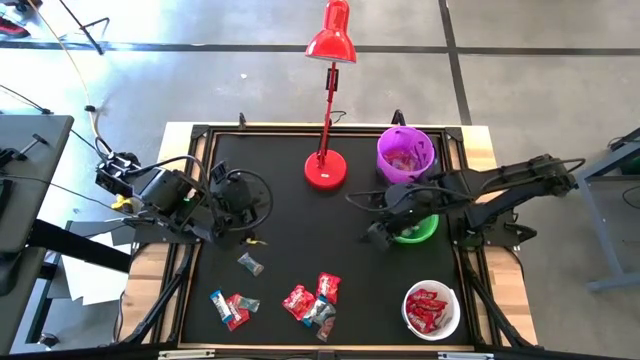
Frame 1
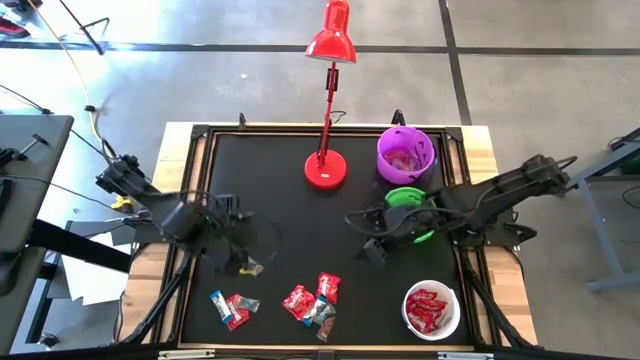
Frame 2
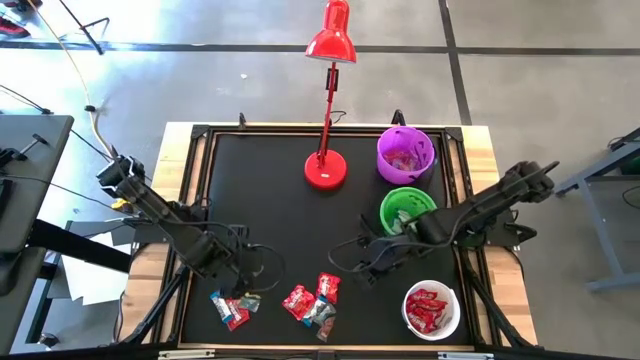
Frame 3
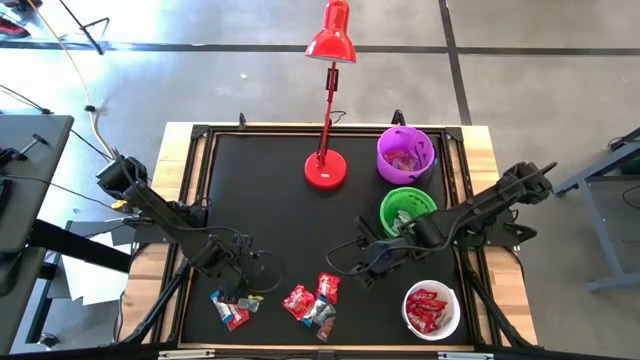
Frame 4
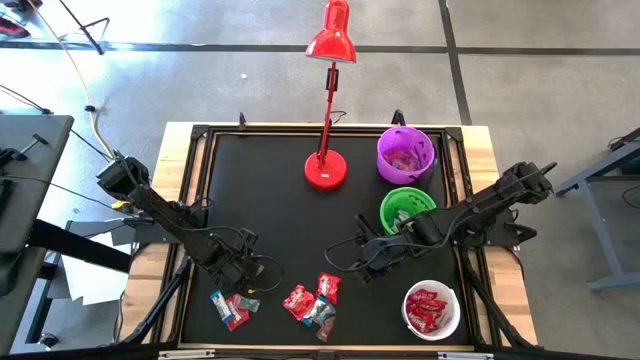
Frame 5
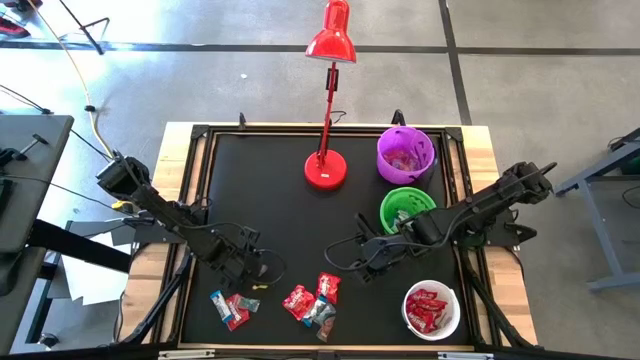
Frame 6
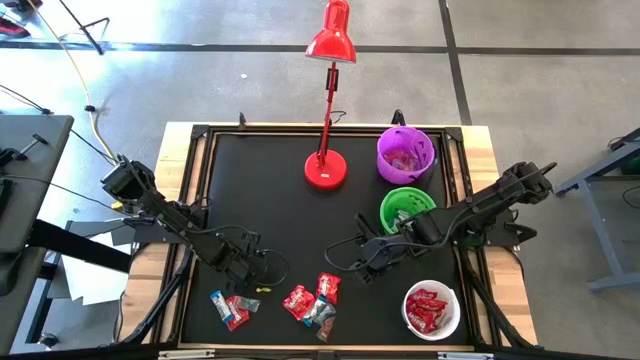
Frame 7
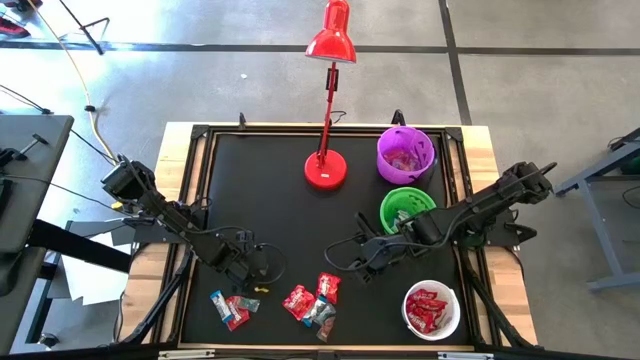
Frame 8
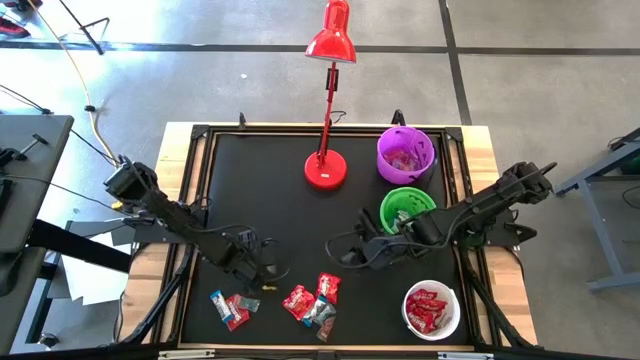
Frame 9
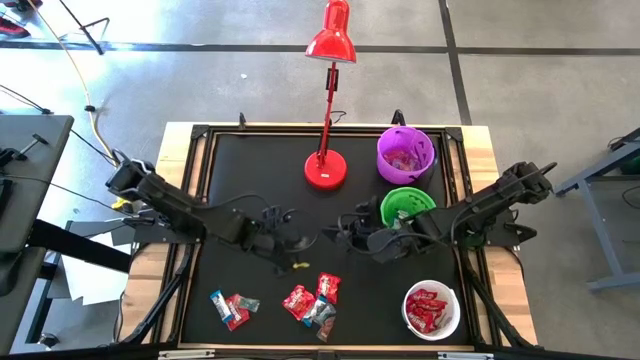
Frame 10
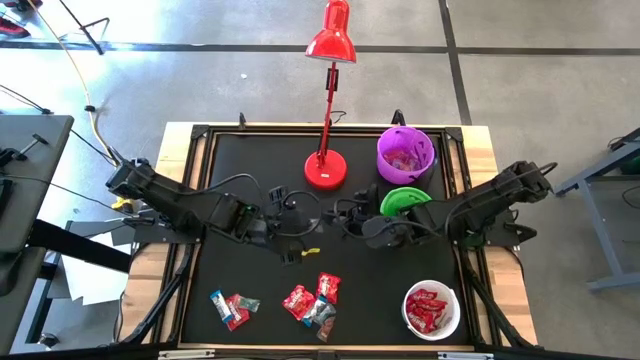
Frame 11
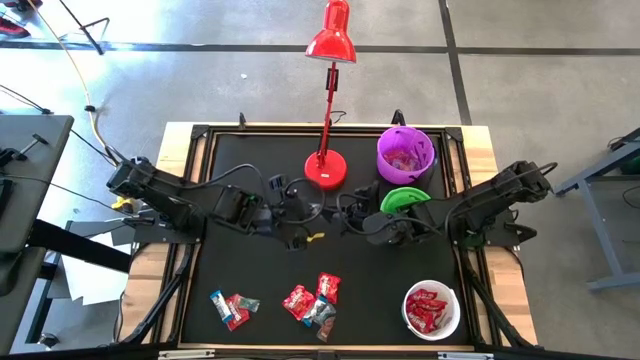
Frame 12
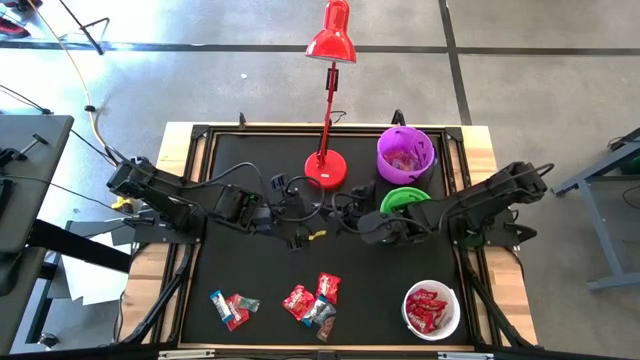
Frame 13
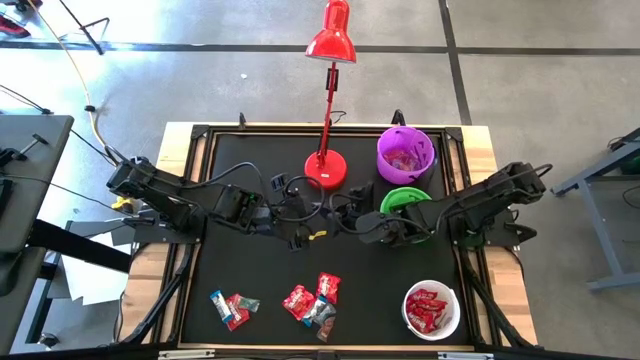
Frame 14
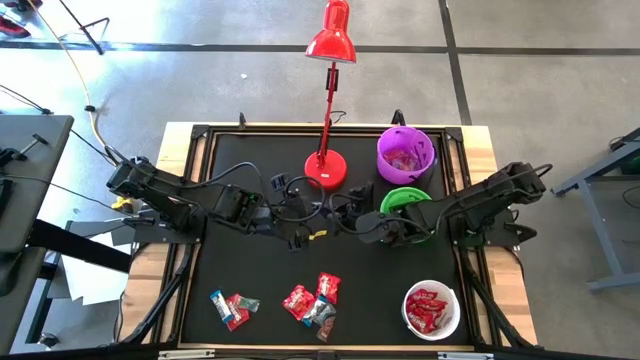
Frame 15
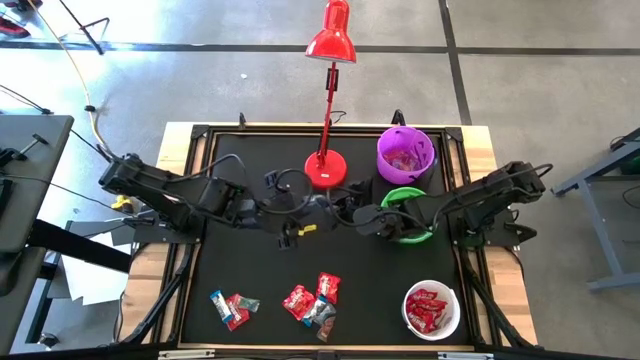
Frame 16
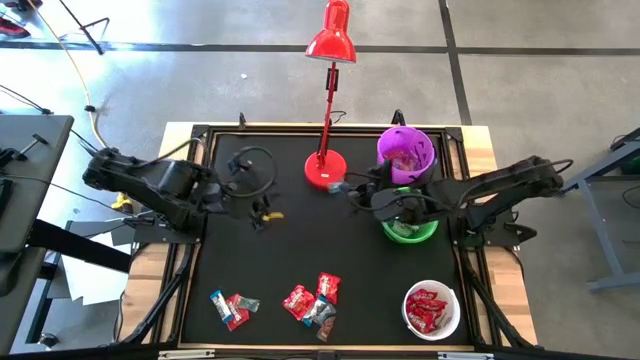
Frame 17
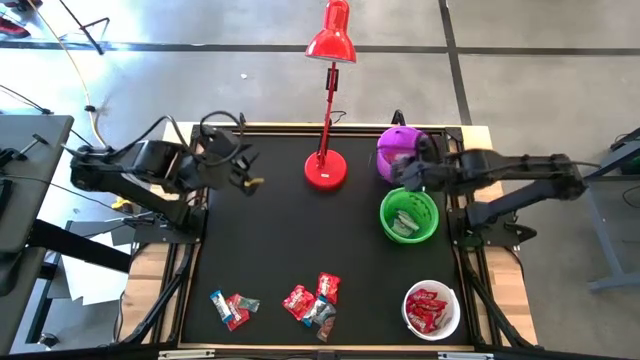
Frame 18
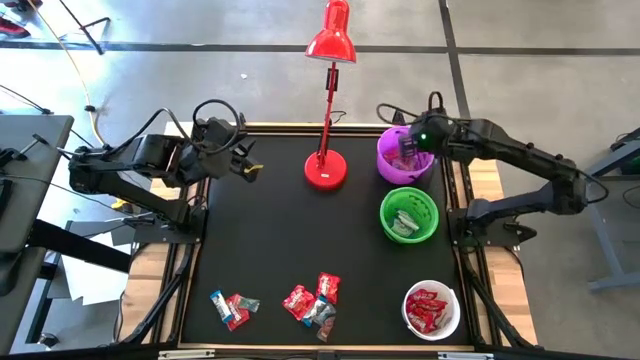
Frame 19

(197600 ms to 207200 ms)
Task: Organize candy in baskets
Put the blue gummy into the violet bucket

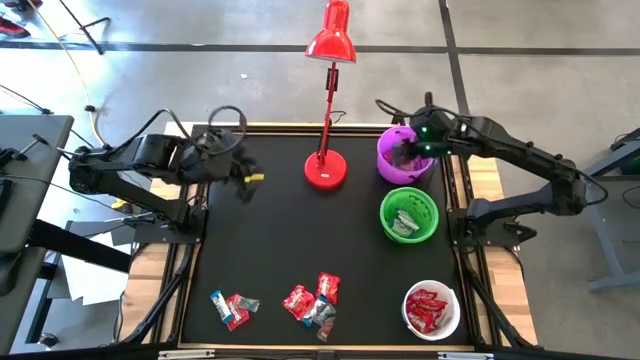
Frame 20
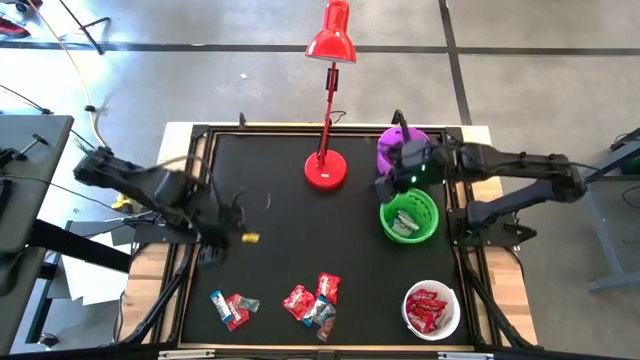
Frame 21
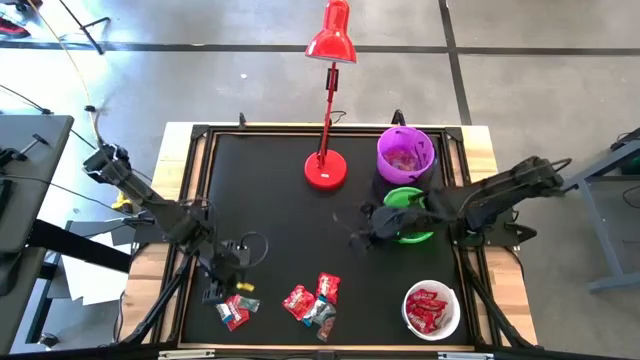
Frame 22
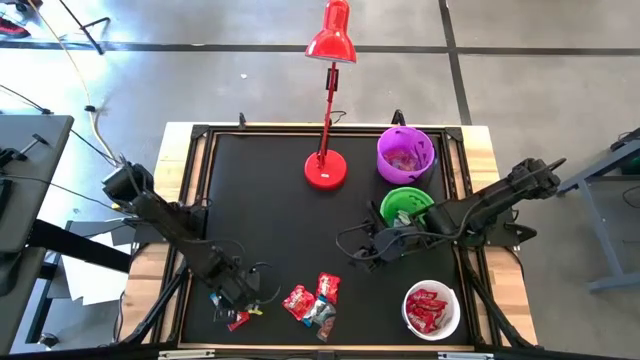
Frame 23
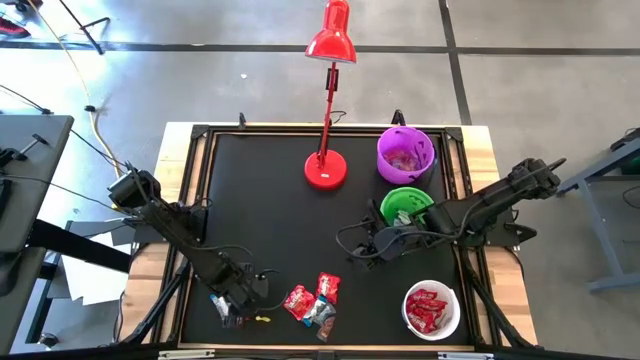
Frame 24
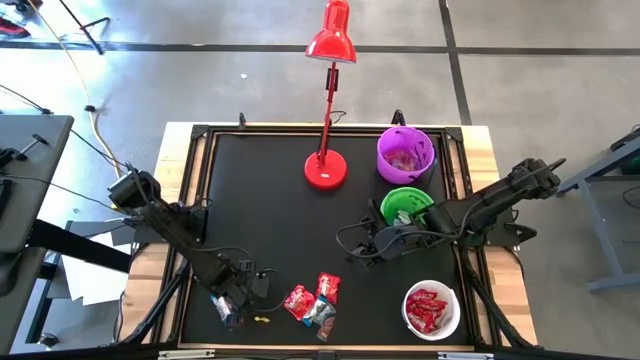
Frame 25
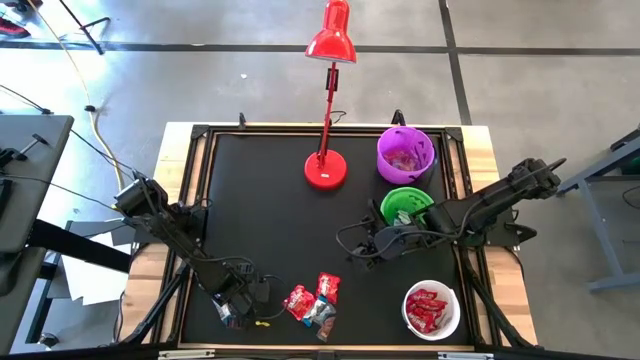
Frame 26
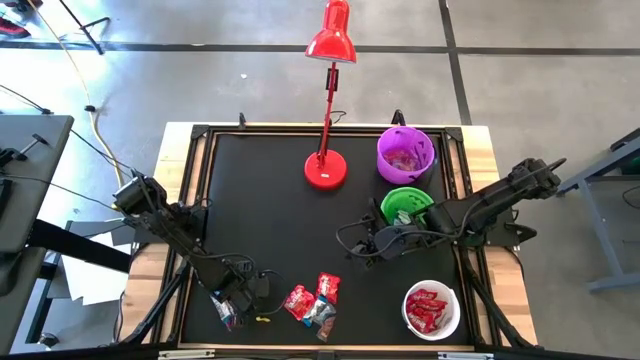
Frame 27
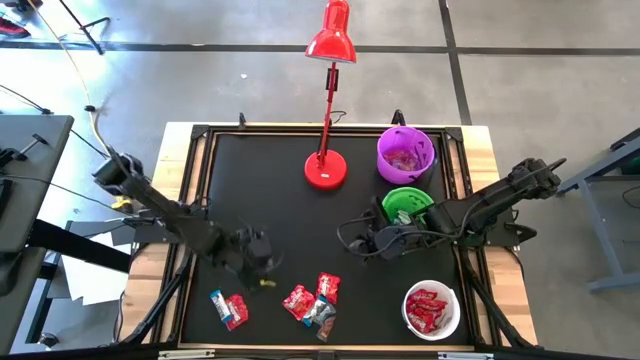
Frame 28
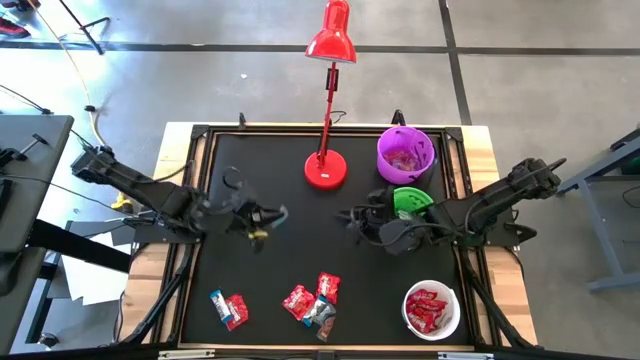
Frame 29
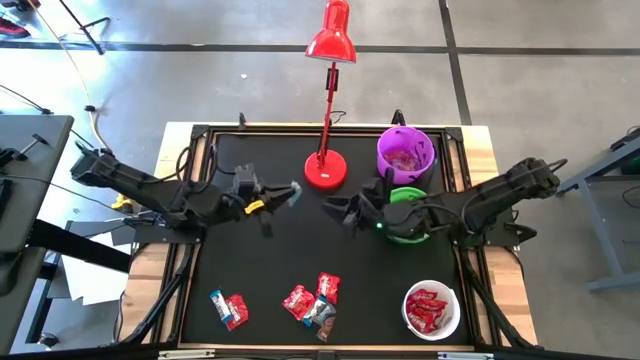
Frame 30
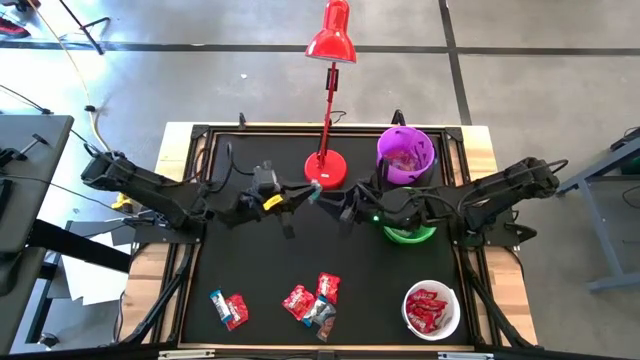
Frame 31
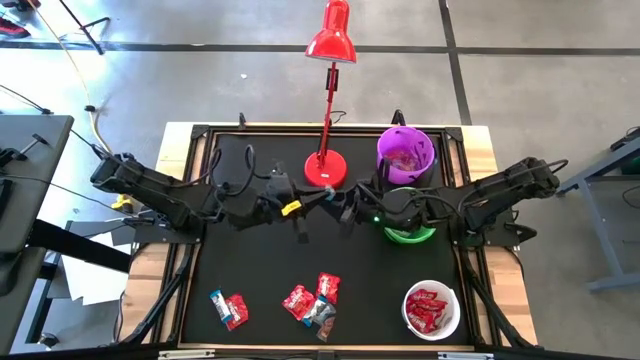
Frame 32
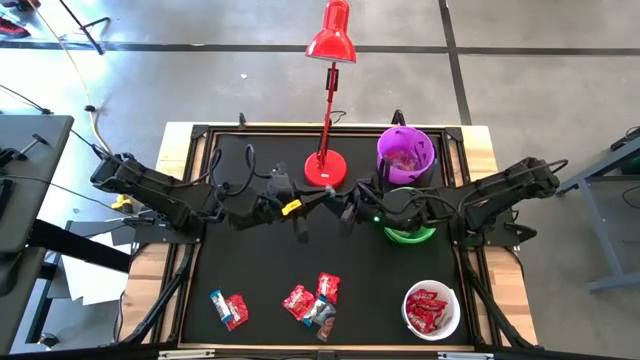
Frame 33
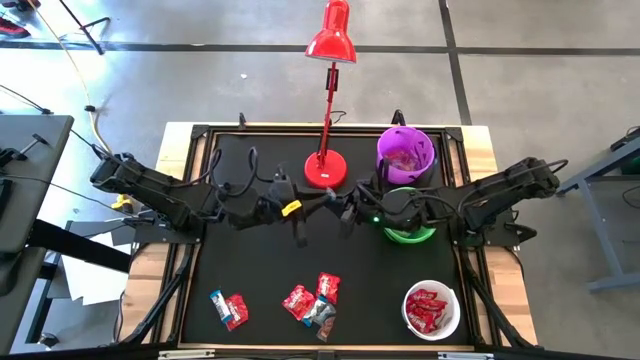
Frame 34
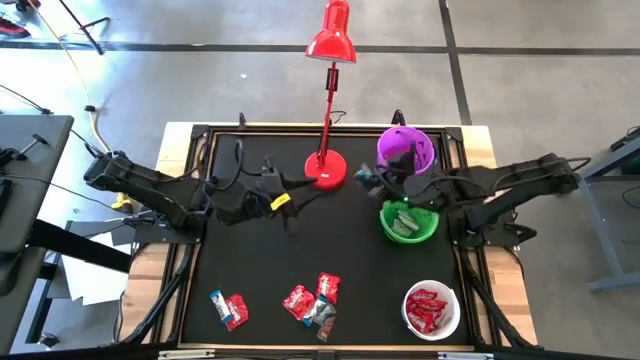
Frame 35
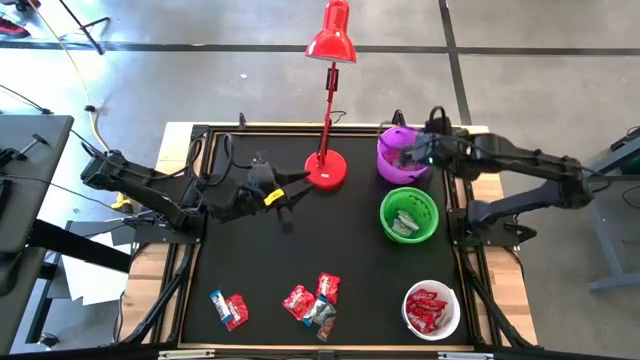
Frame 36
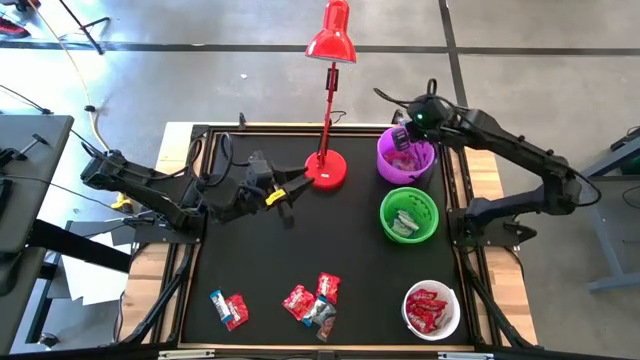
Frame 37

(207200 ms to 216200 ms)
Put the blue gummy into the violet bucket

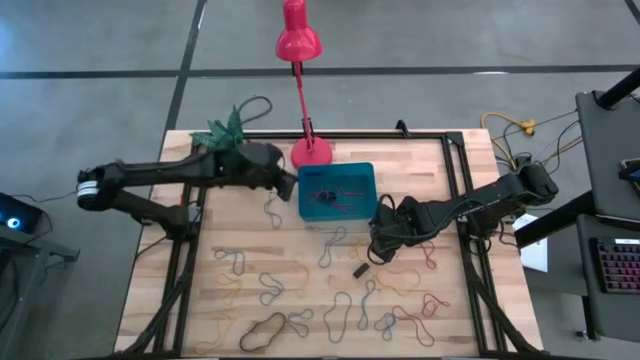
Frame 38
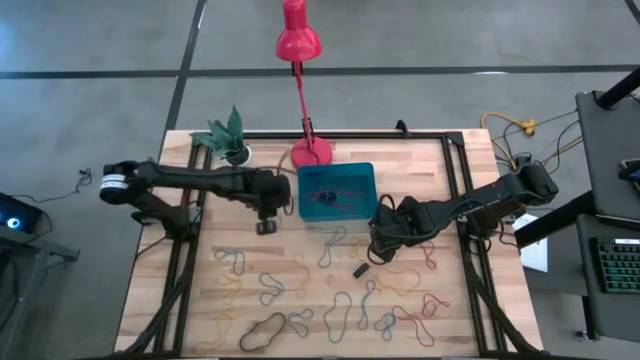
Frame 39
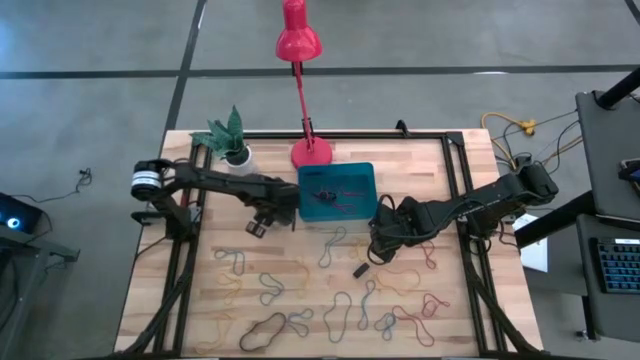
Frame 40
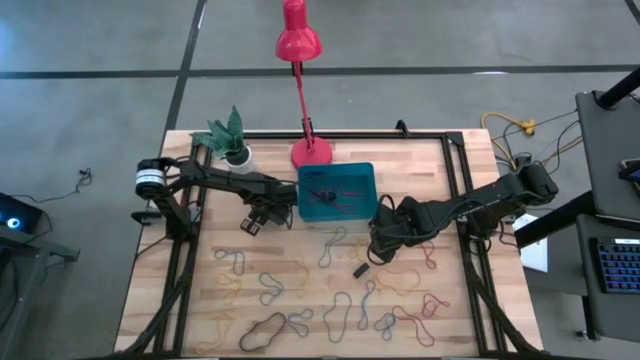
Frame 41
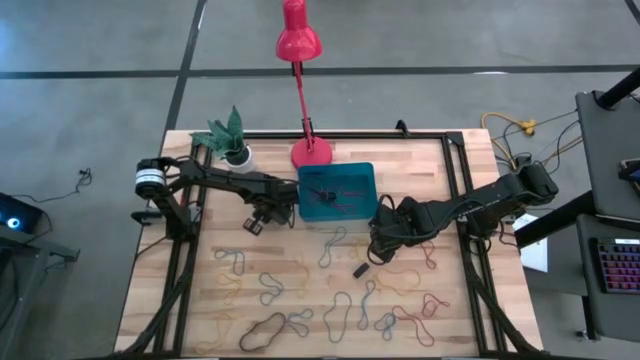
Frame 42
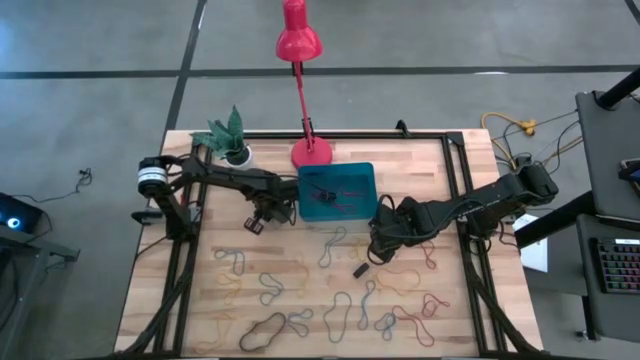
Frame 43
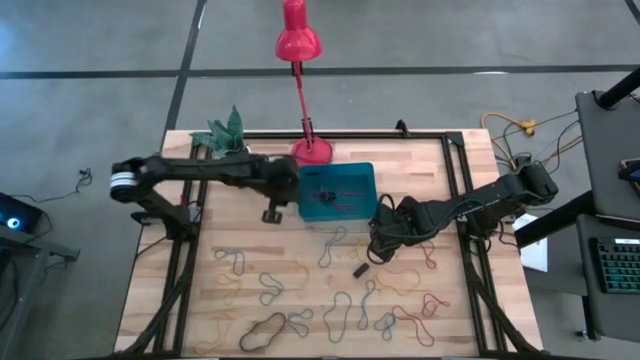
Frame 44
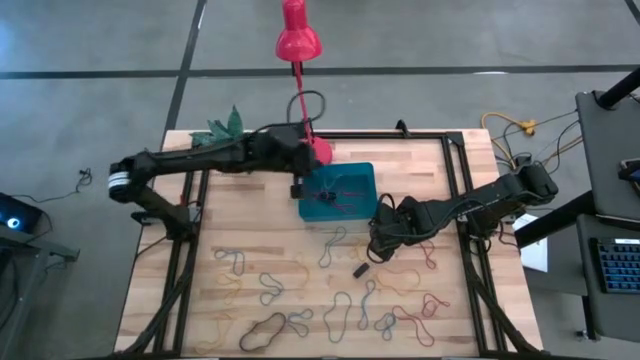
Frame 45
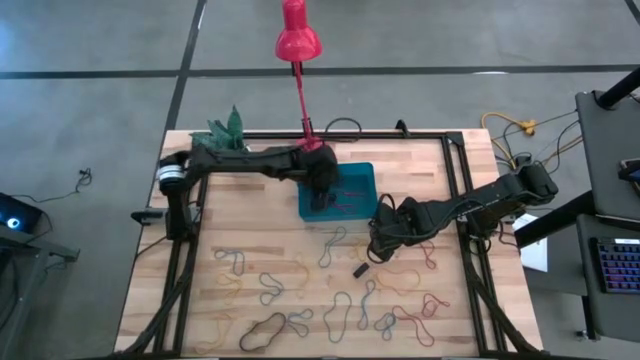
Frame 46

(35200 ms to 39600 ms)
Task: Pick and place rubber bands into bin
Put the blue rubber band into the blue bin
